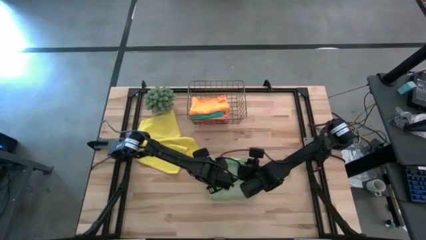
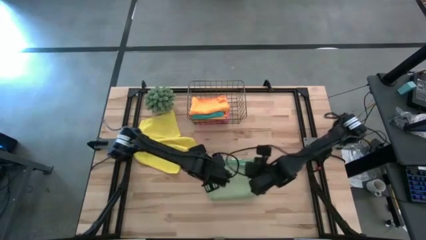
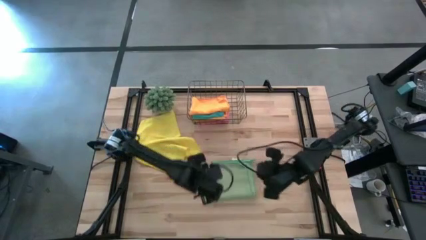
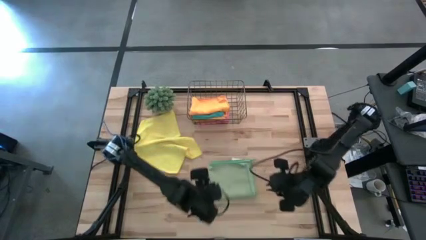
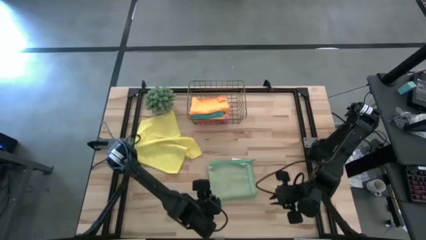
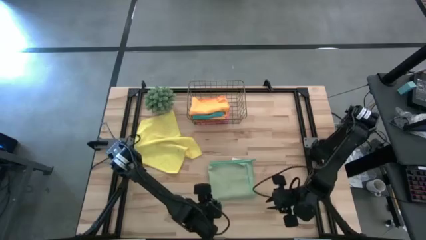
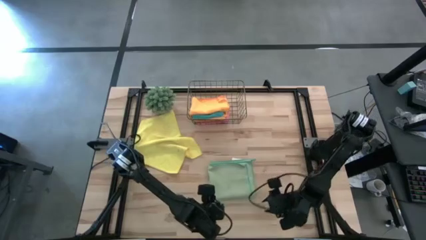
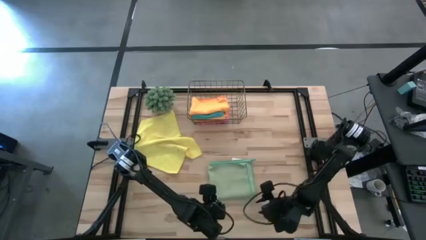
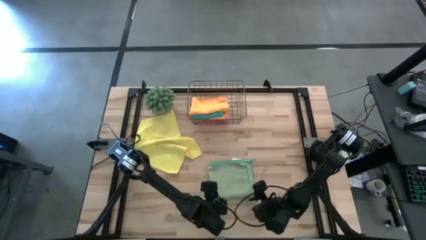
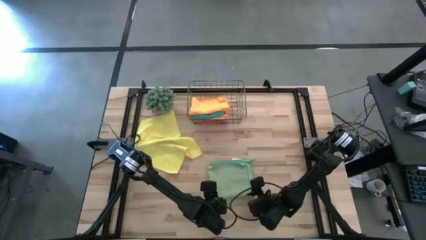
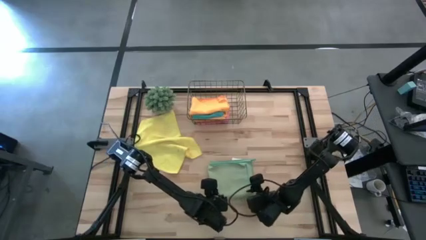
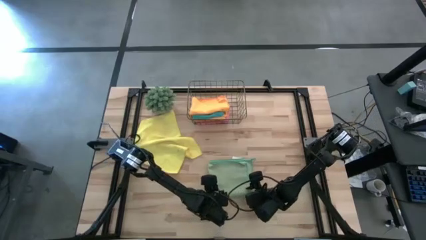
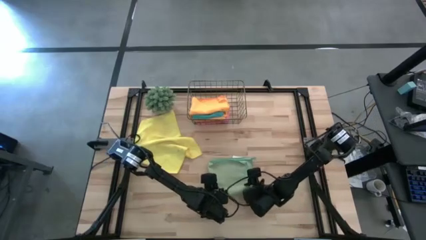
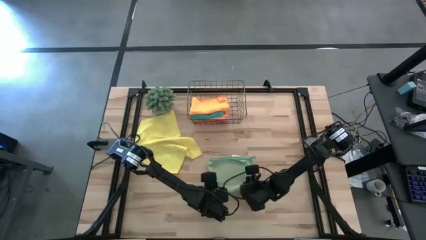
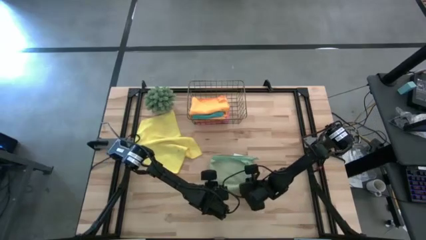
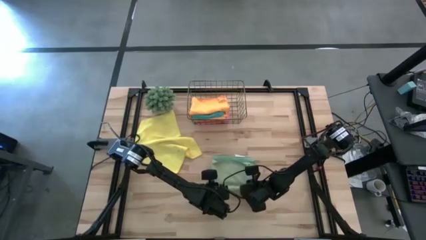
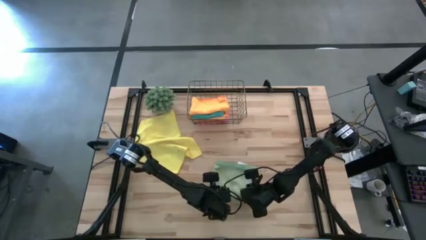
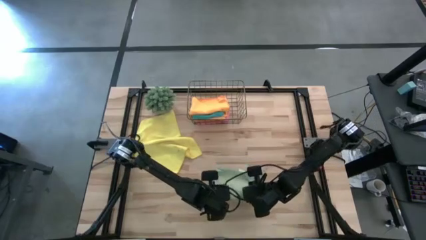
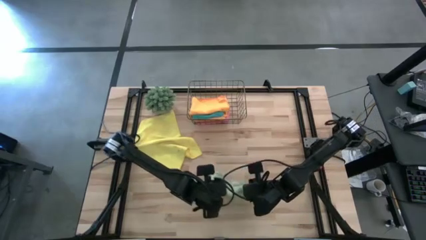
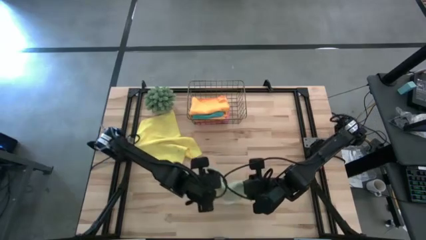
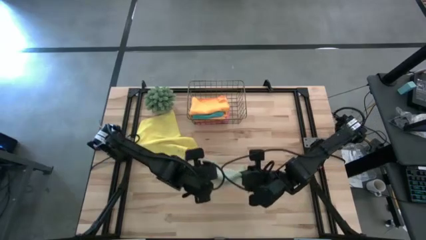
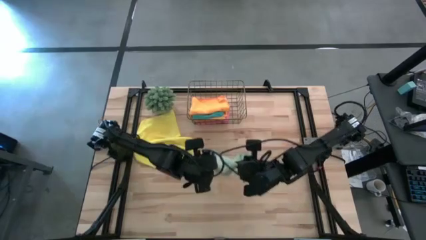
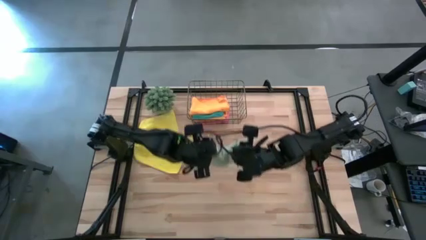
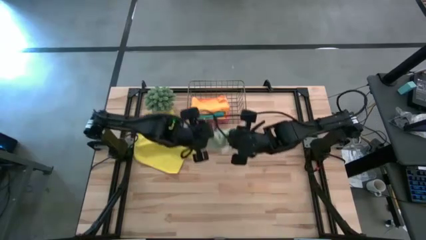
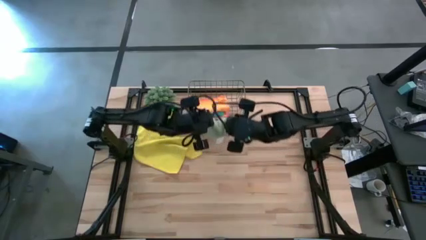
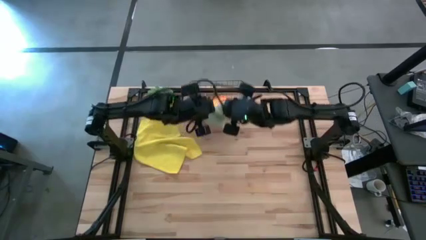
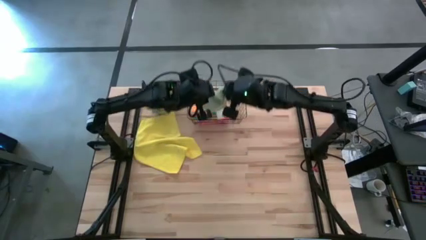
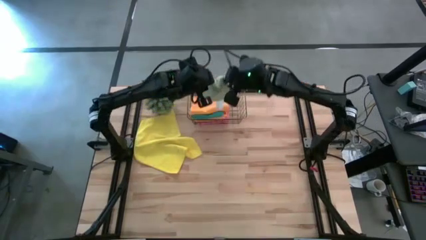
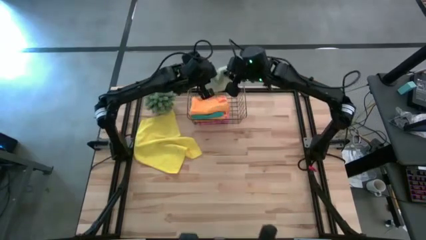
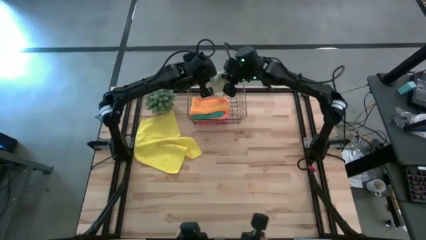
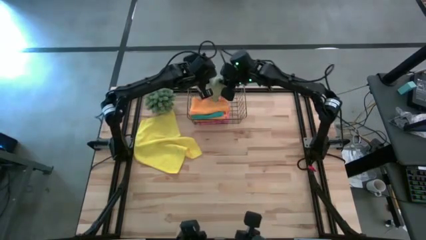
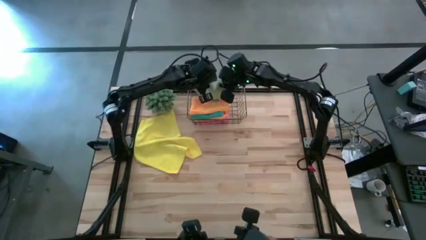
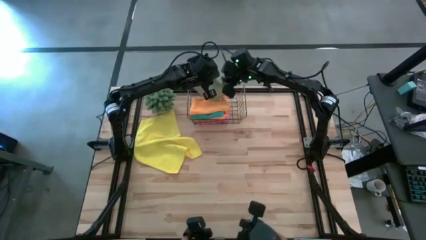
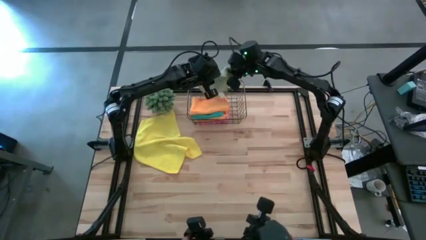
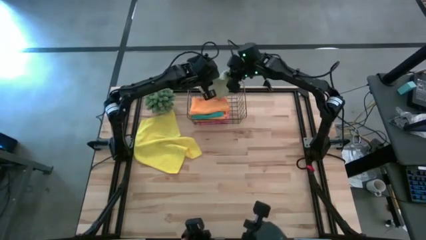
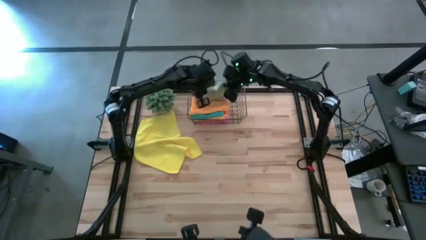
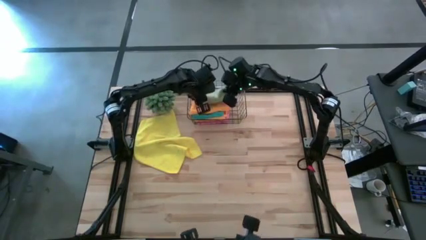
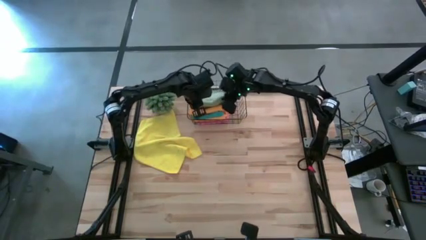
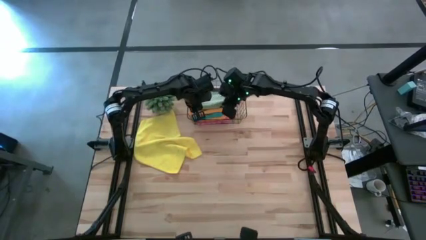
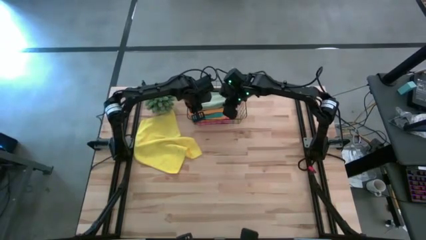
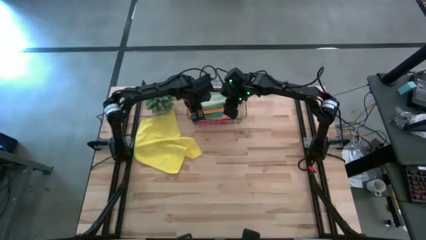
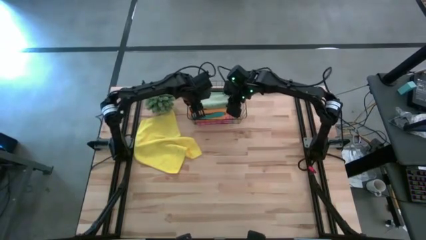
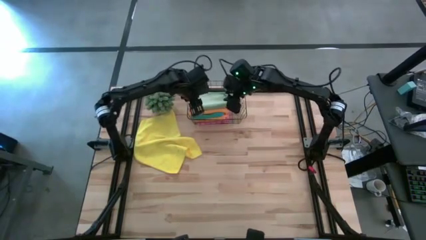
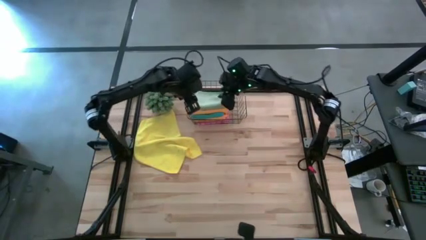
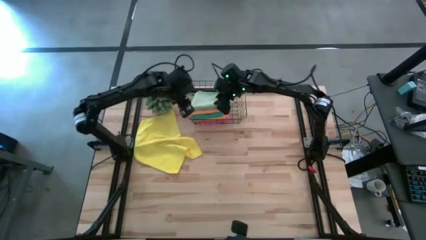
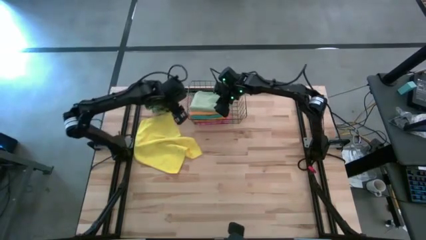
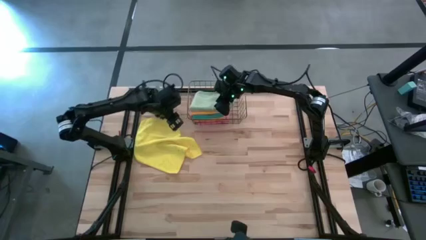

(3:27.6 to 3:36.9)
Task: Fold microfiber towels
Put the folded light green microfiber towel into the wire basket

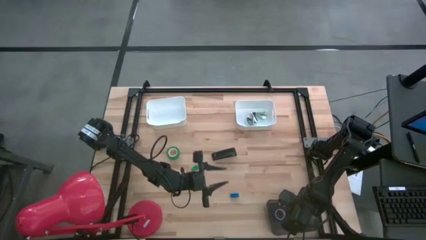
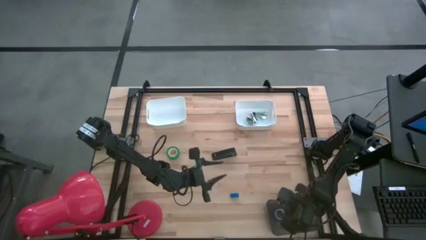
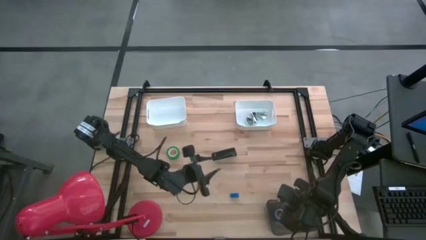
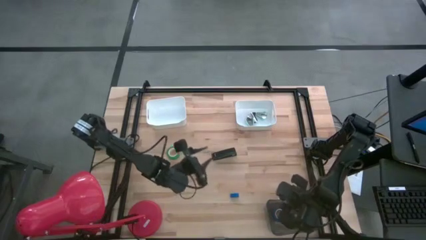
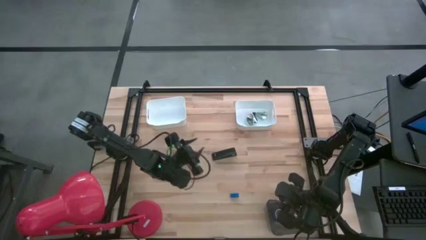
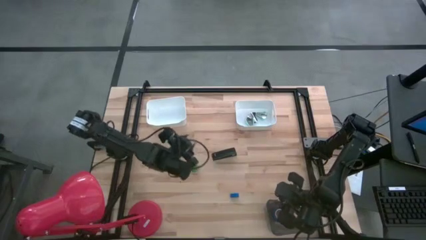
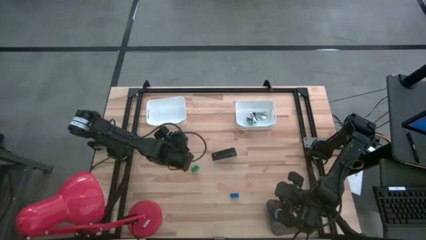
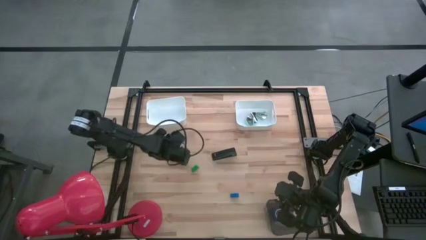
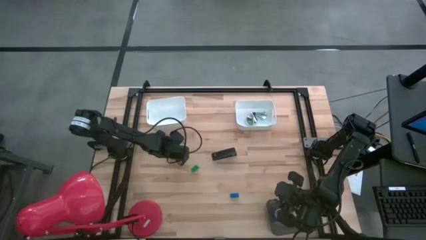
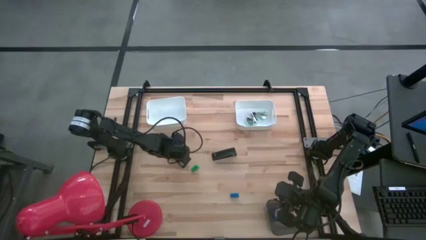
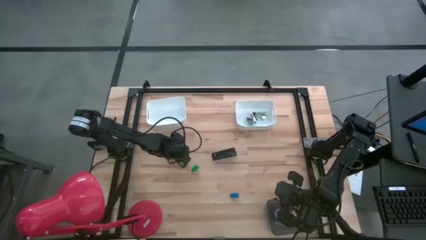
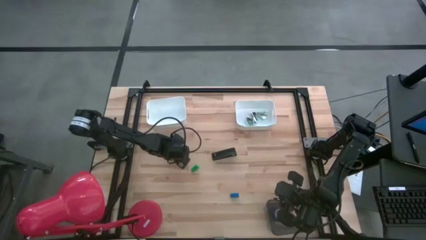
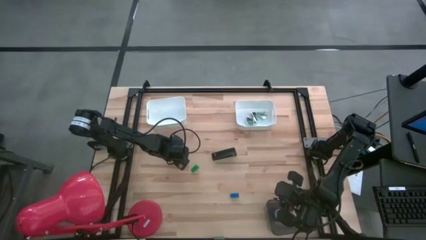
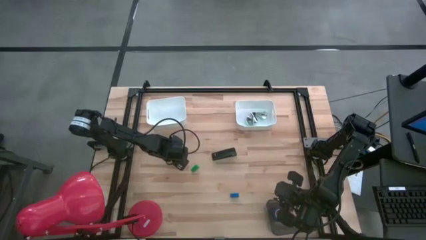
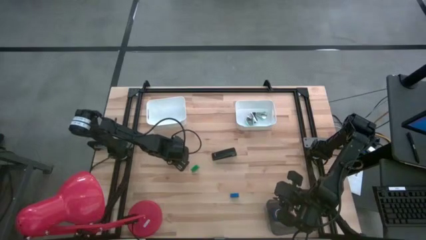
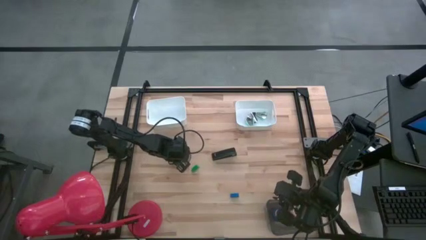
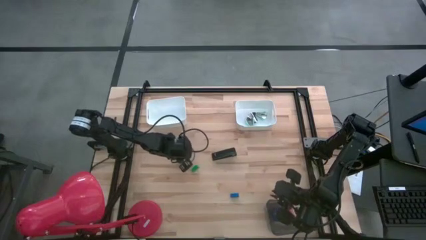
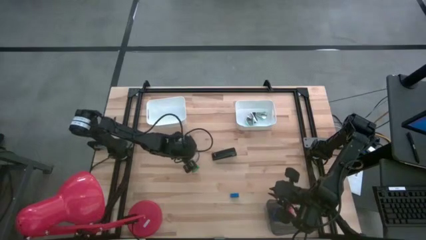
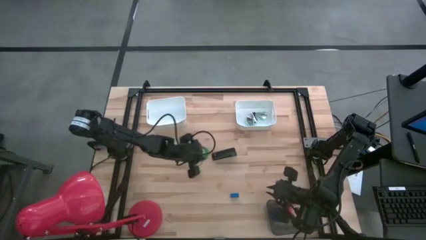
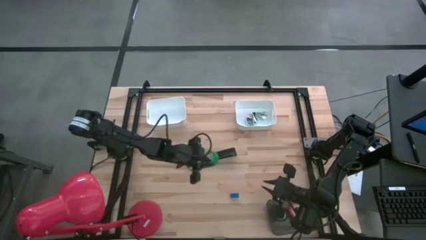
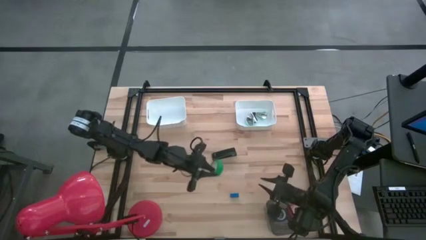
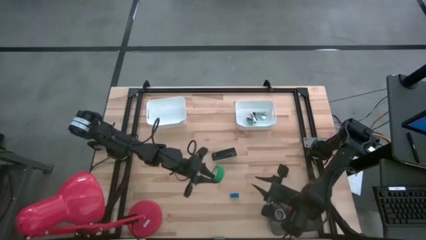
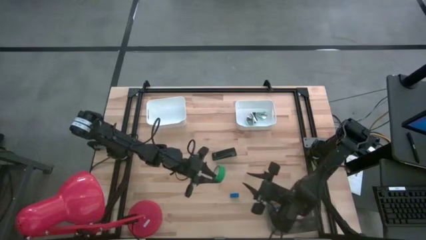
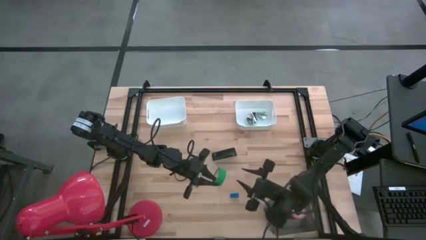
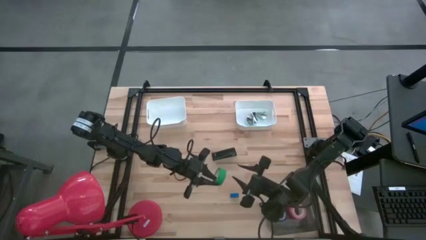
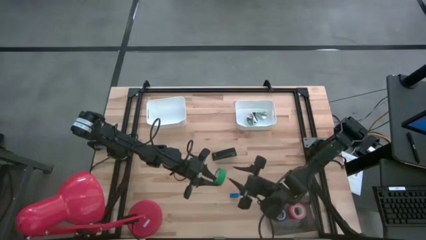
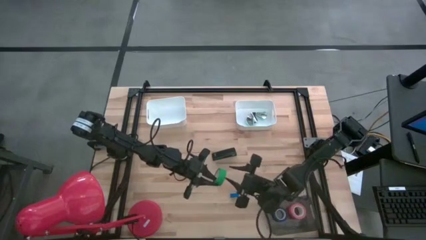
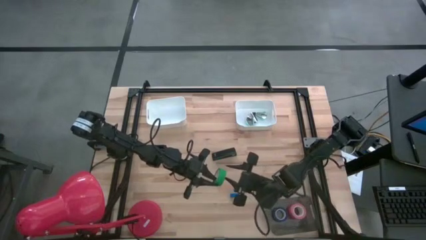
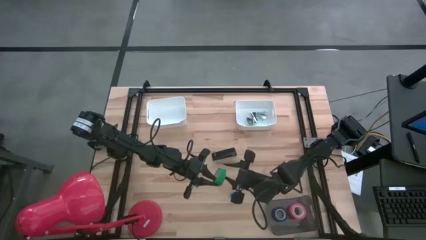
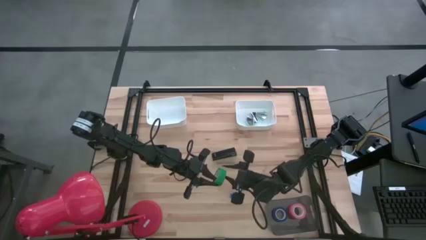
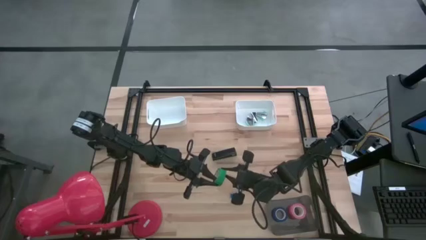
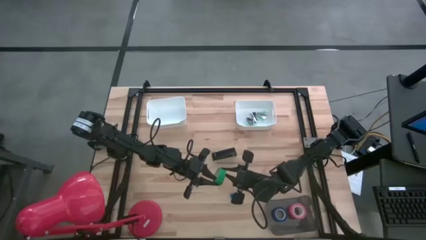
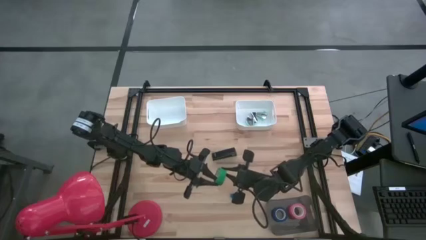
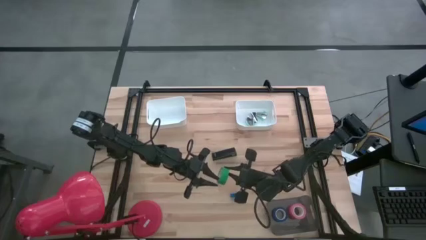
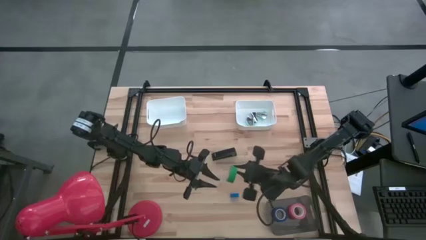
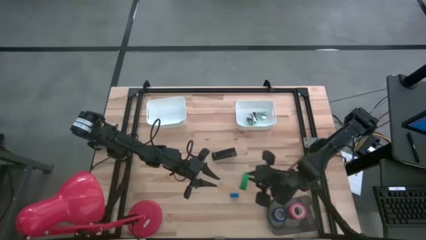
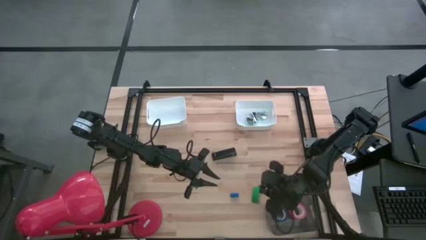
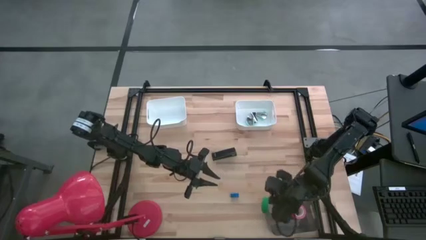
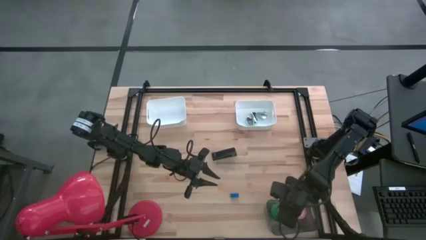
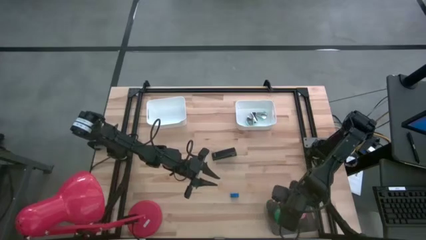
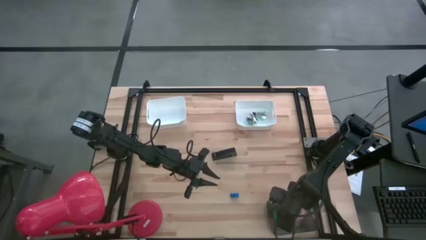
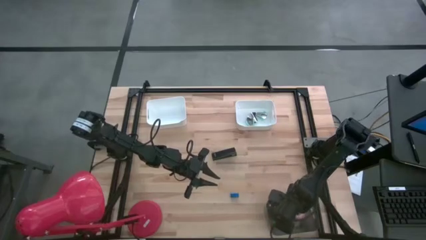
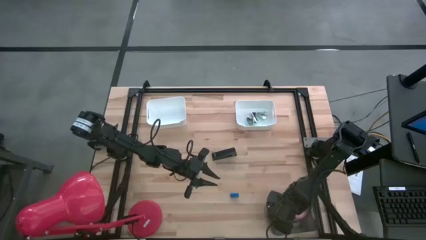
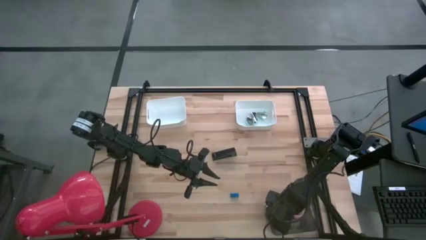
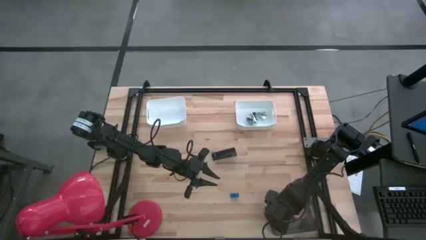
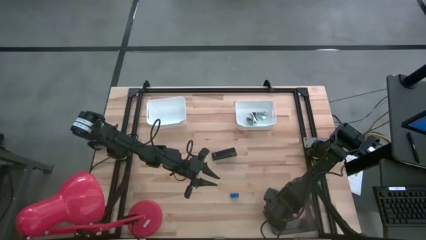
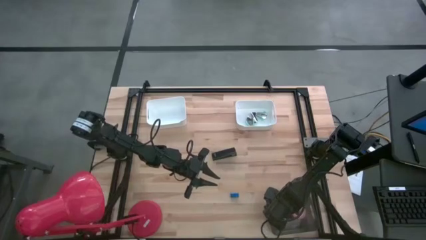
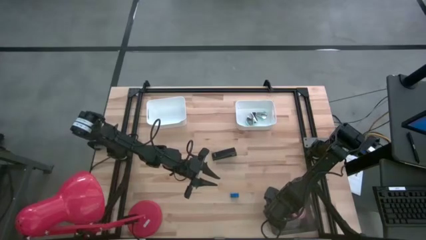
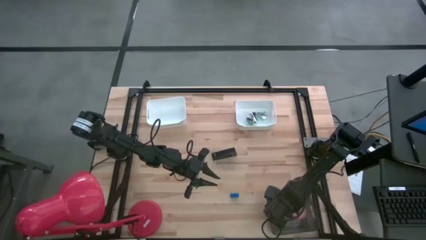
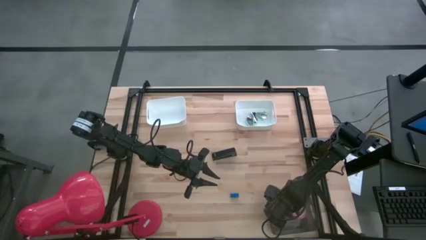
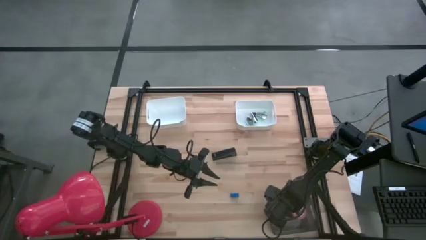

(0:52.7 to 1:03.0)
Task: Pick and place Stapler, Stapler remover, tape
Put the green tape into the black bin
